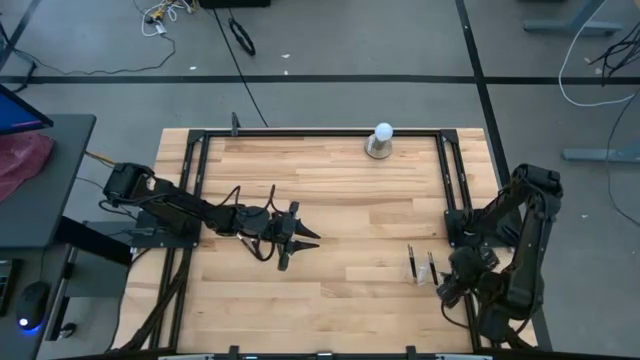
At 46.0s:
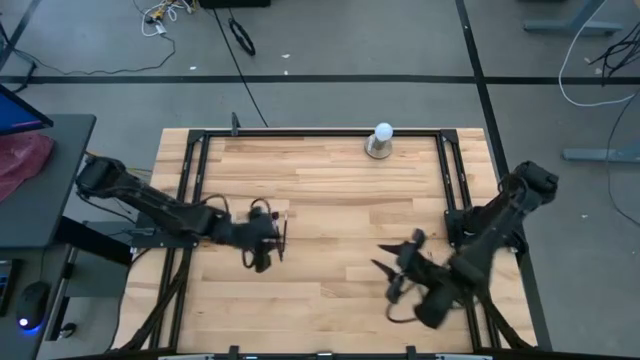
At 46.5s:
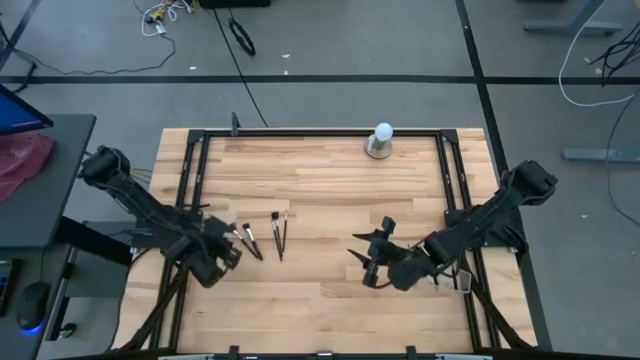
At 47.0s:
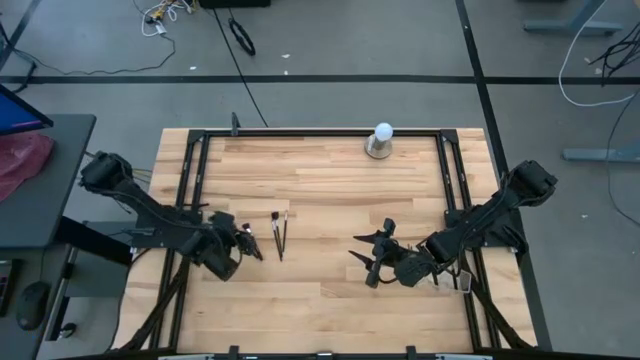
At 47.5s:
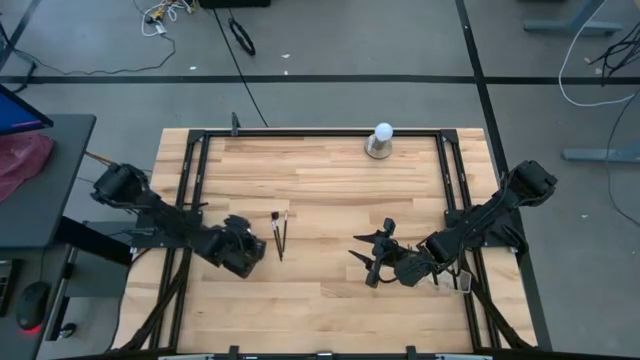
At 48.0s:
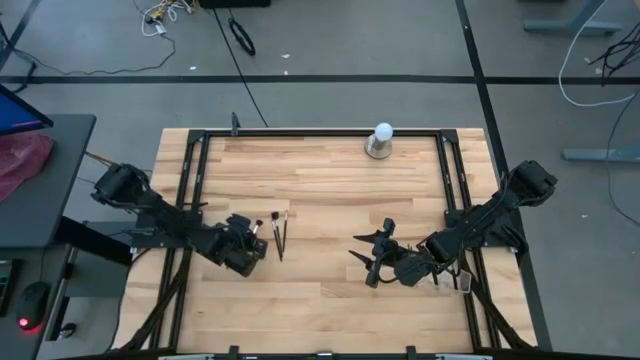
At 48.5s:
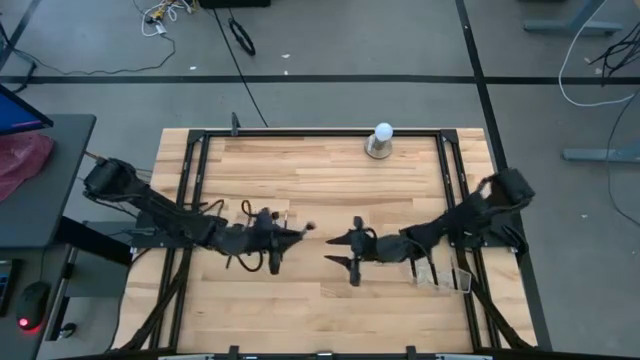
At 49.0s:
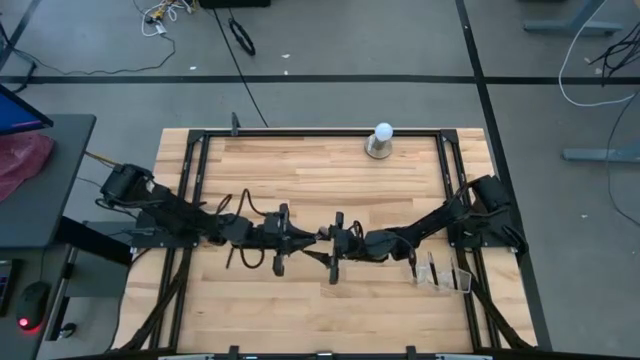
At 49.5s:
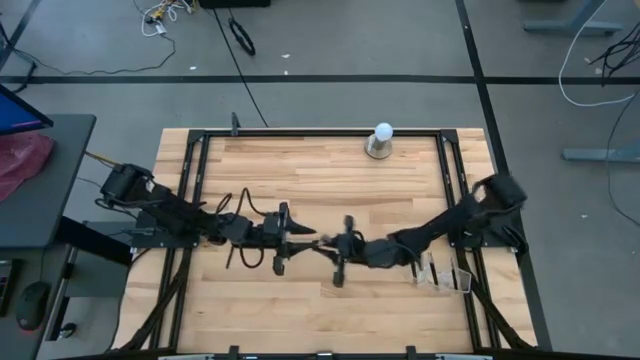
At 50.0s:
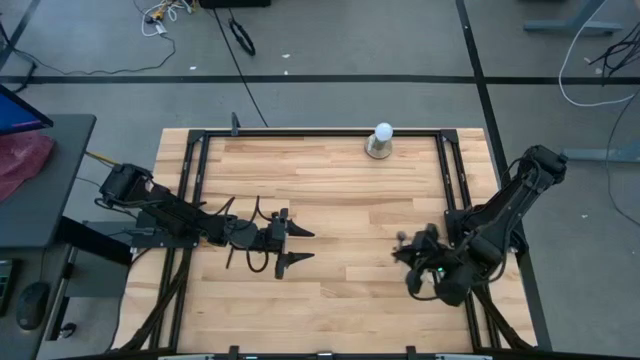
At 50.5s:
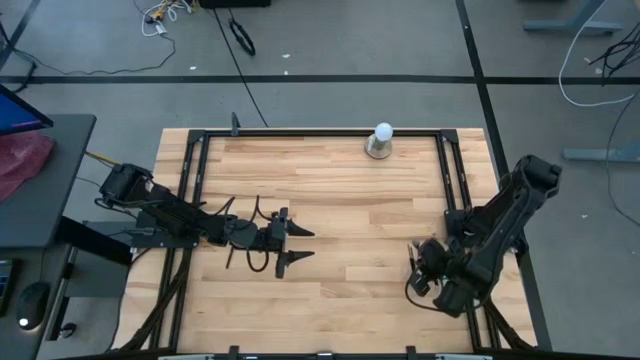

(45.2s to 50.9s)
Task: Put items in baskets/containers
Put the black blush brush into the transparent organizer

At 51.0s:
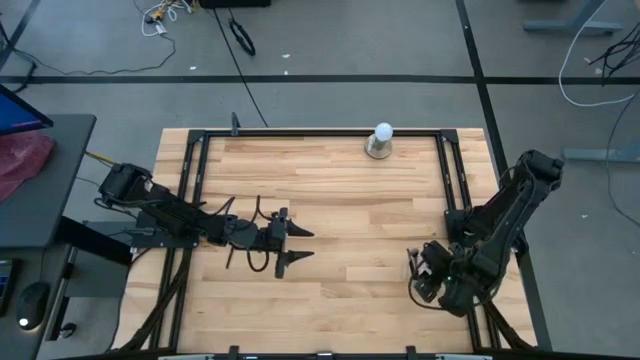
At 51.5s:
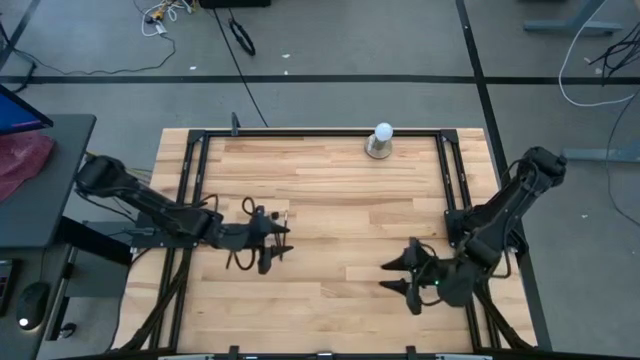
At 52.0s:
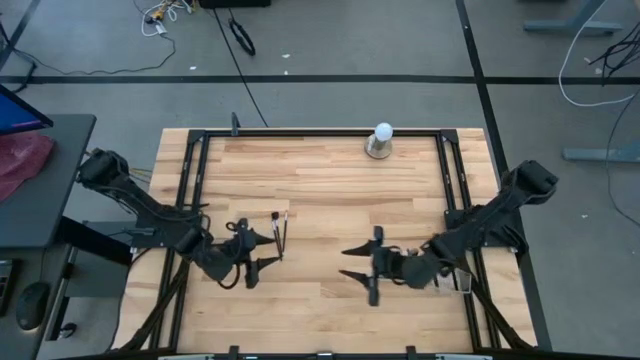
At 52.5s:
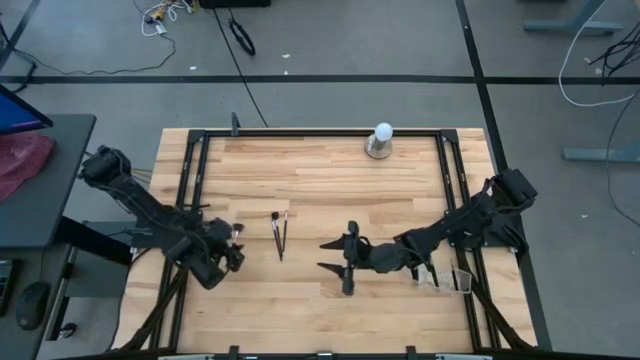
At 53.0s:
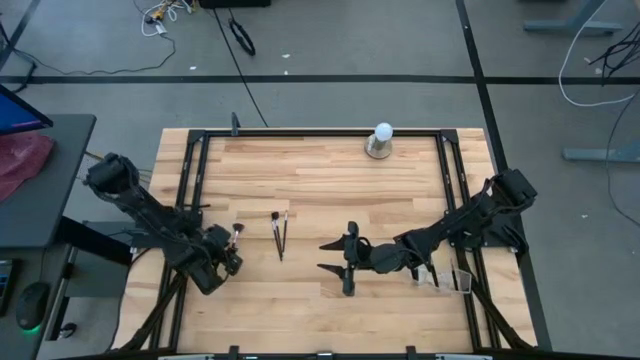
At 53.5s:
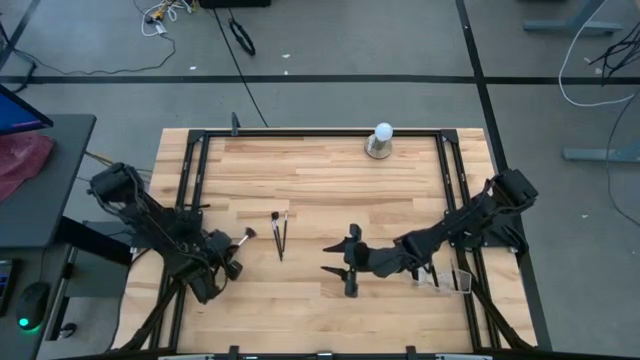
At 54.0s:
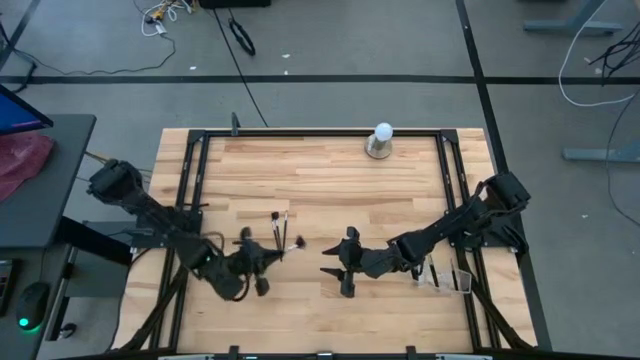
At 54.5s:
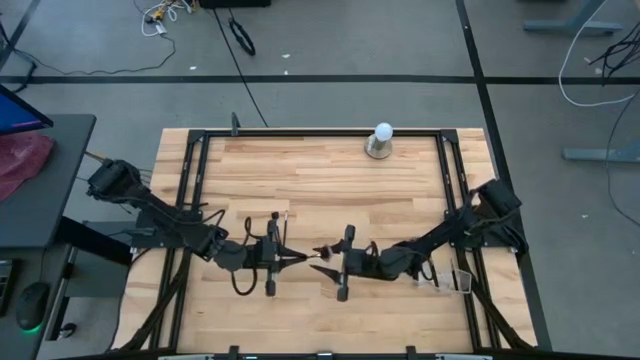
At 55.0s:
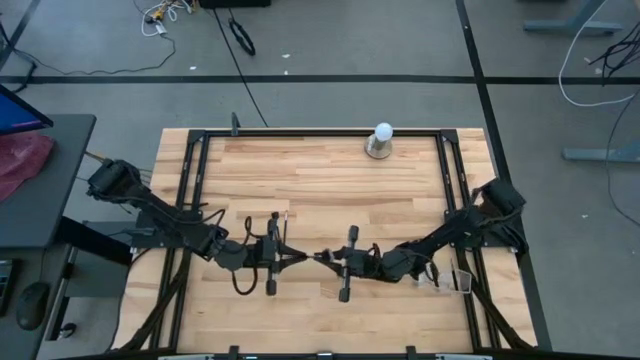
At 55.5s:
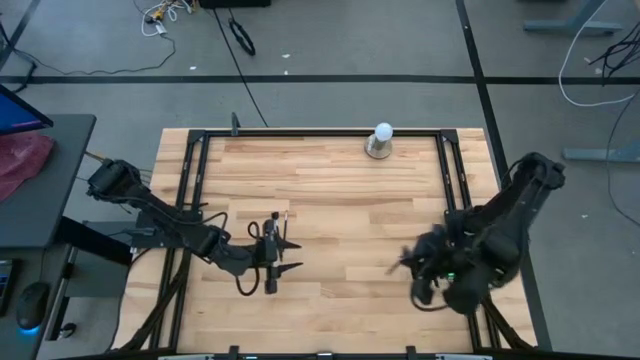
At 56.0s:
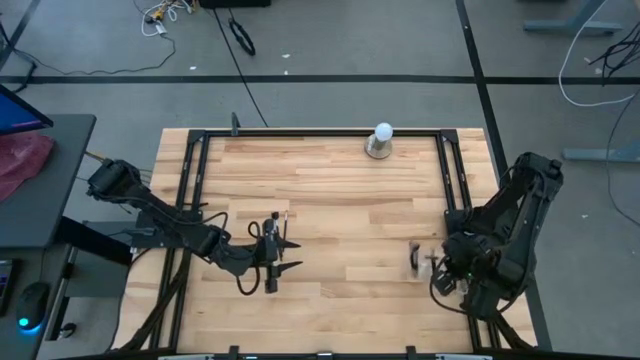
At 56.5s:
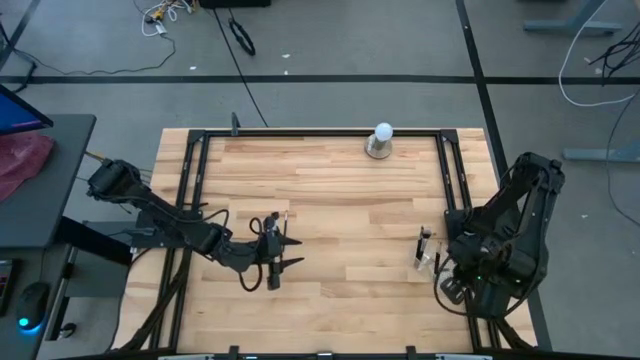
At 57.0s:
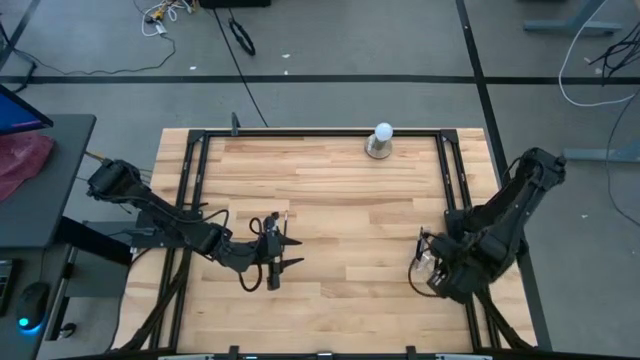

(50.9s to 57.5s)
Put the black highlighter brush into the transparent organizer

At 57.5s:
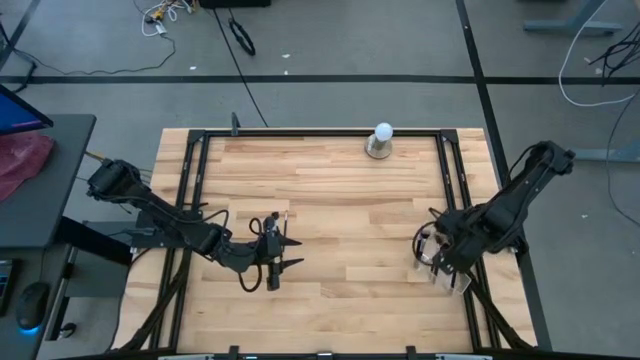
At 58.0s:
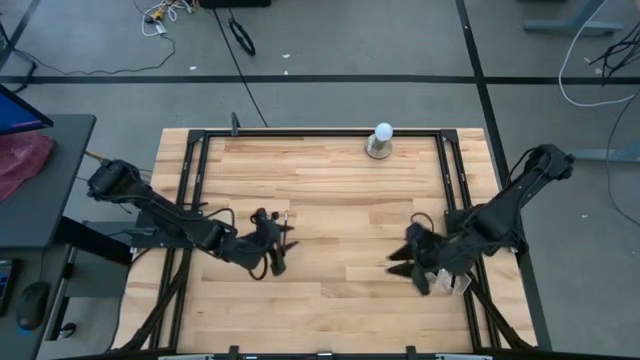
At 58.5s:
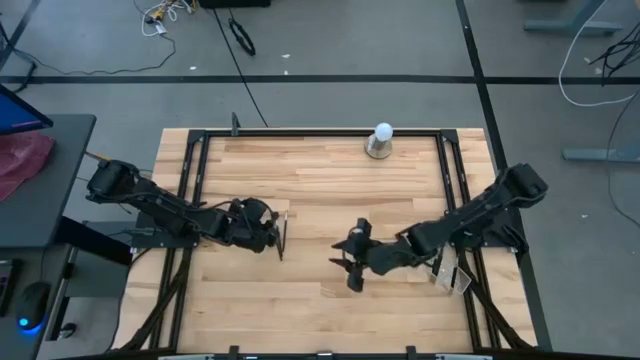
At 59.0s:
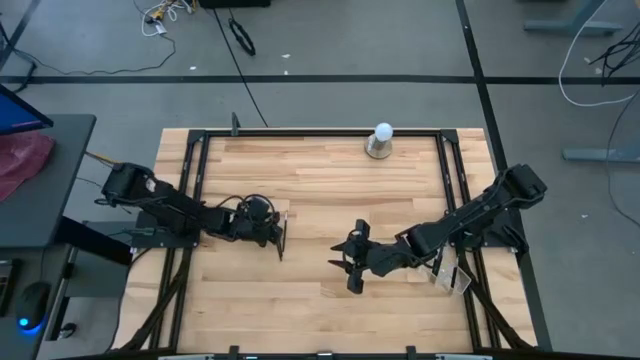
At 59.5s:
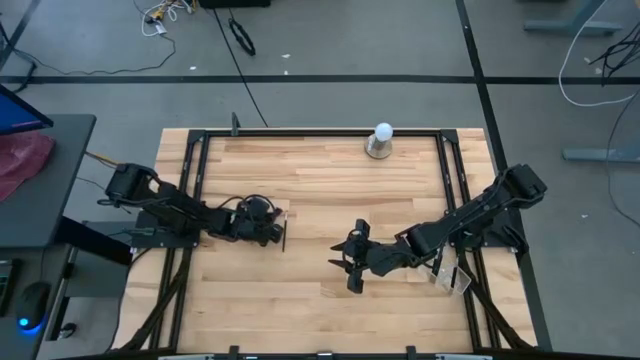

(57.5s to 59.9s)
Put the black eyebrow brush into the transparent organizer

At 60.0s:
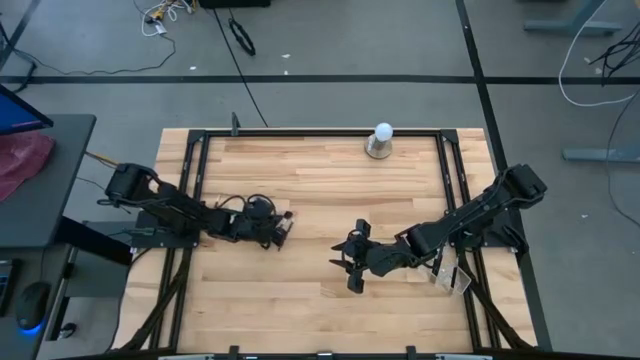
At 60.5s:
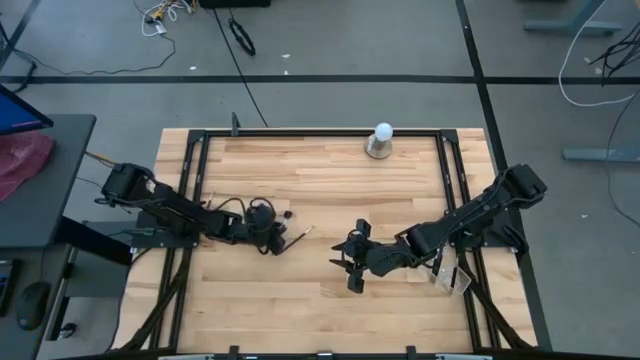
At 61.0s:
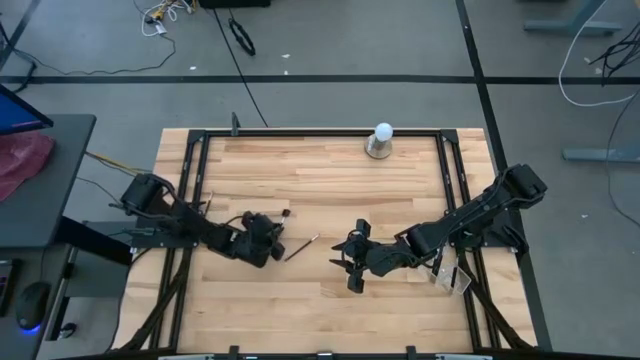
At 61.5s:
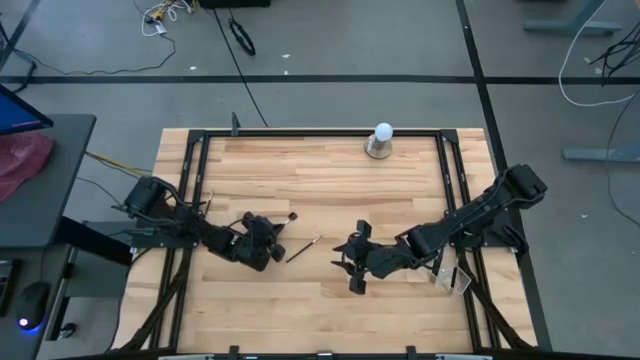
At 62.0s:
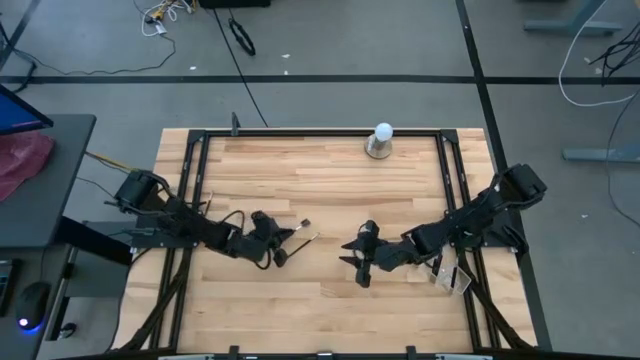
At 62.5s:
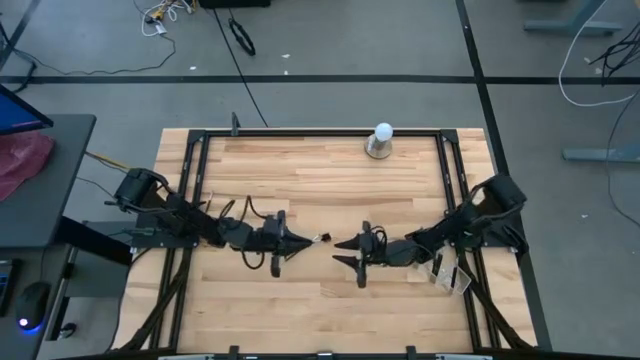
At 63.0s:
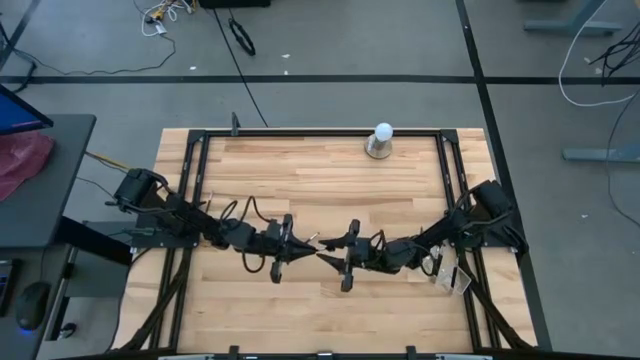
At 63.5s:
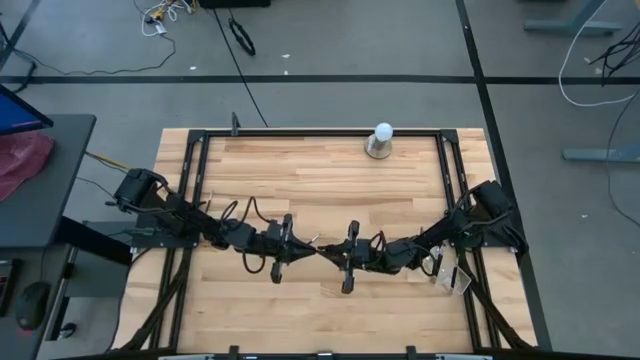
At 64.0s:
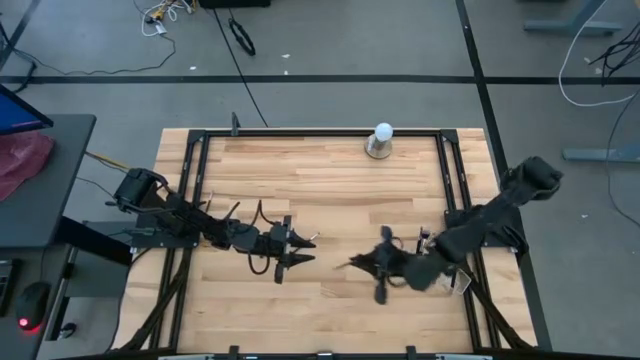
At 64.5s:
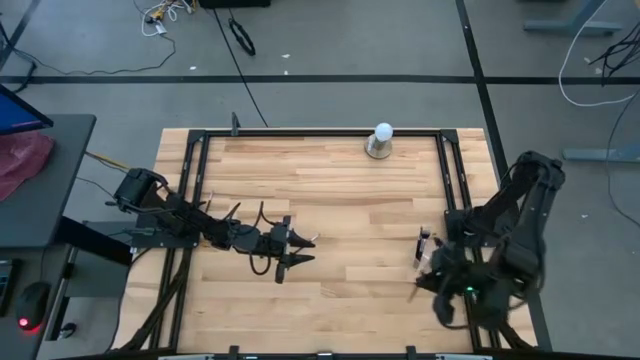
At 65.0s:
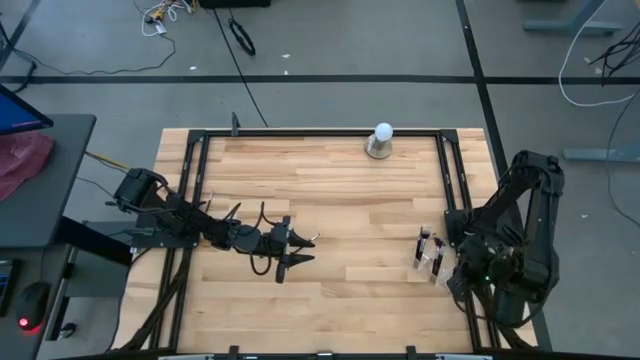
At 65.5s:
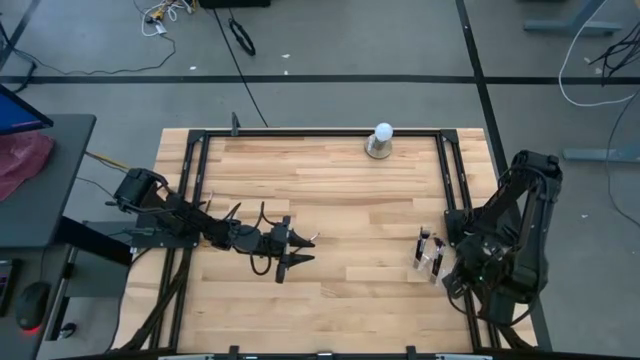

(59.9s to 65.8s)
Put the black eyebrow brush into the transparent organizer
